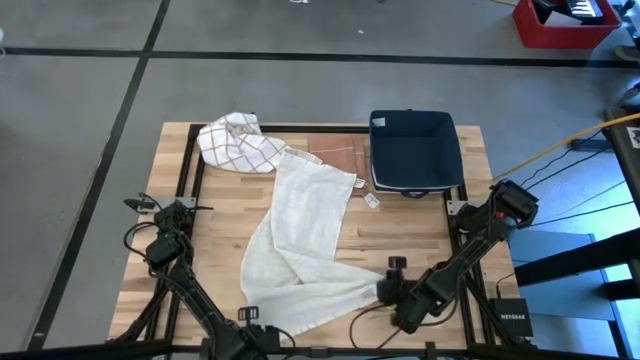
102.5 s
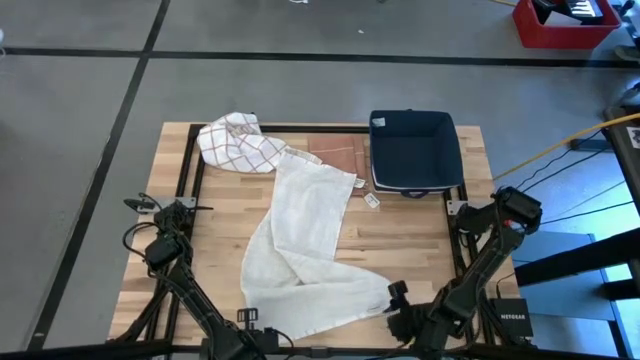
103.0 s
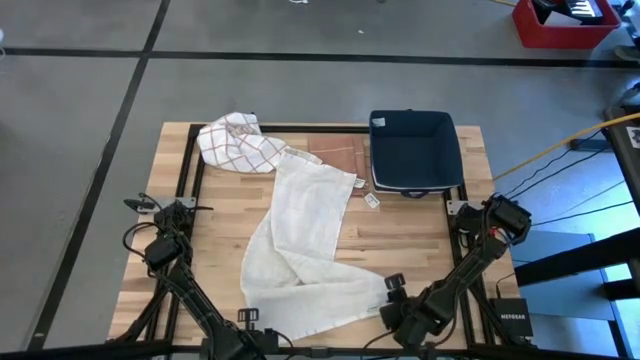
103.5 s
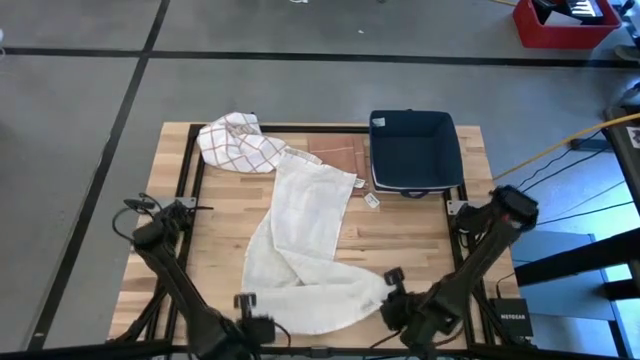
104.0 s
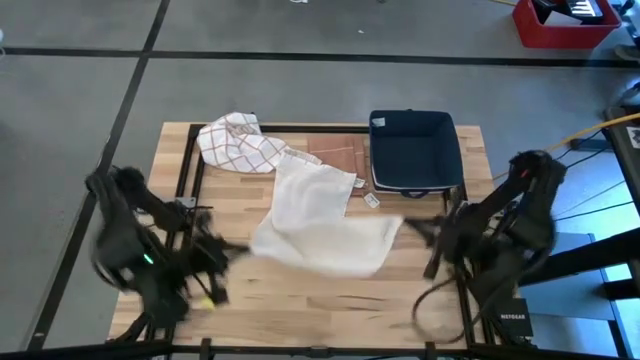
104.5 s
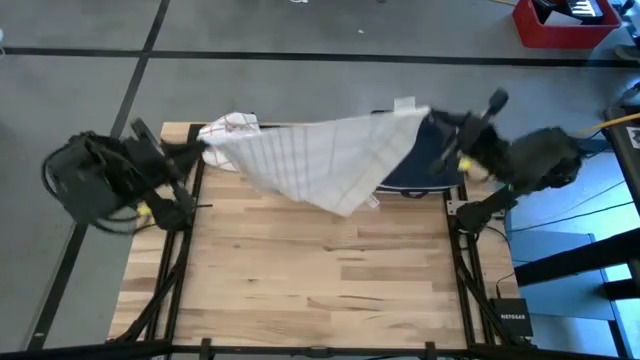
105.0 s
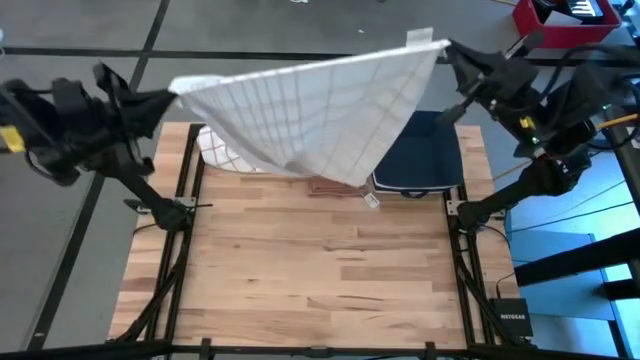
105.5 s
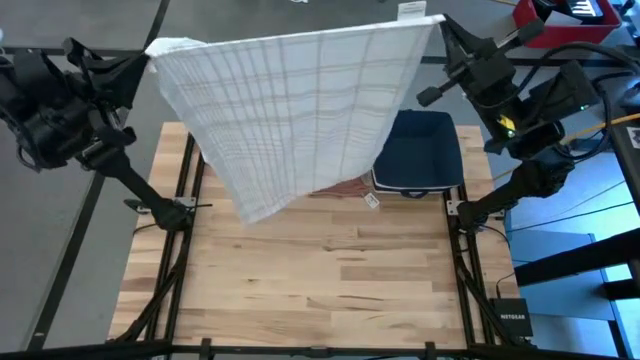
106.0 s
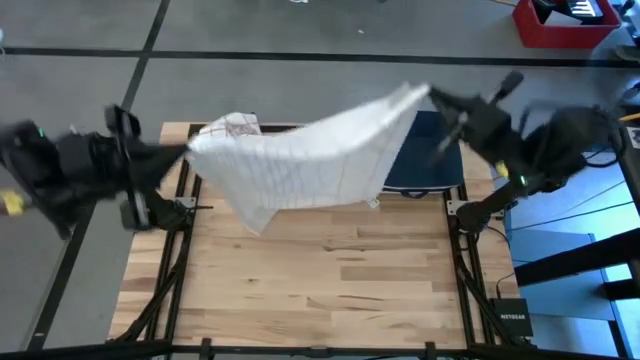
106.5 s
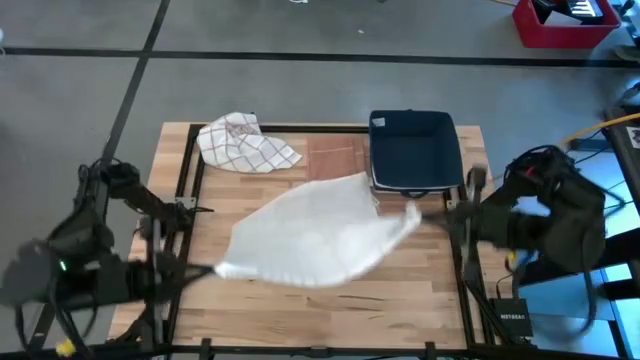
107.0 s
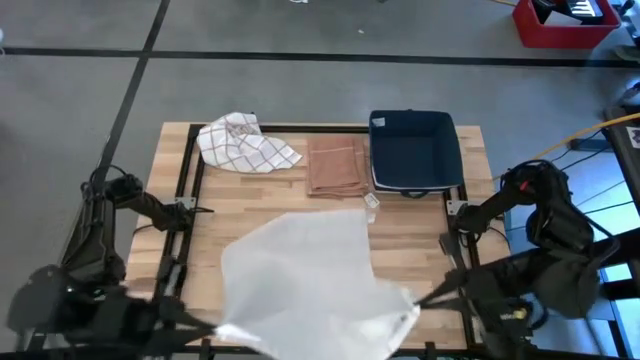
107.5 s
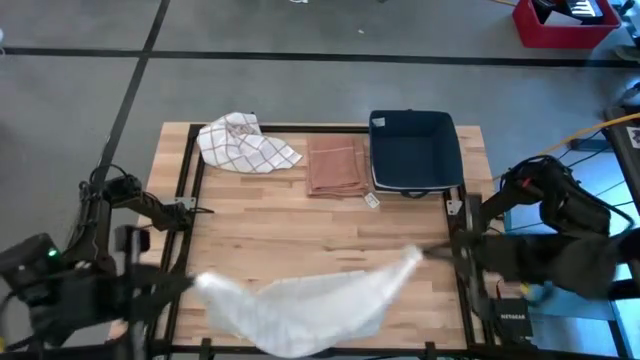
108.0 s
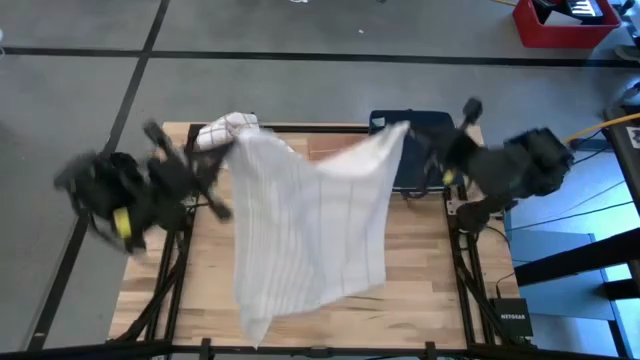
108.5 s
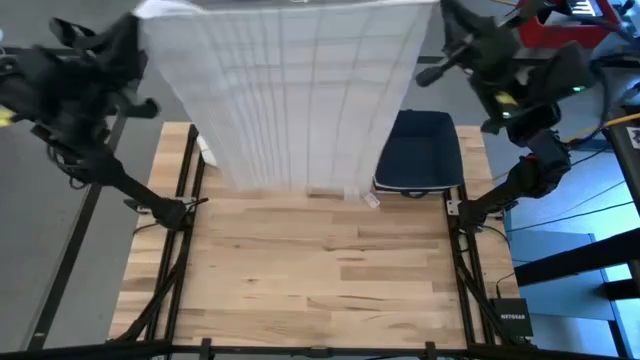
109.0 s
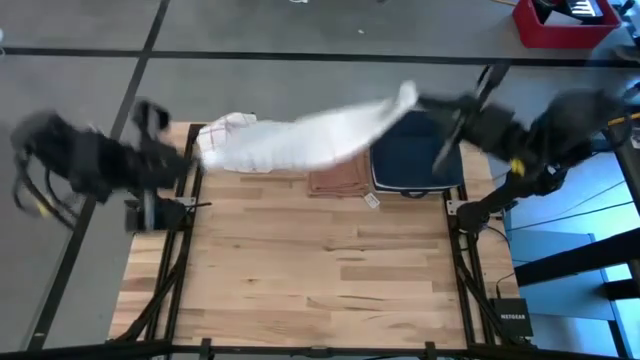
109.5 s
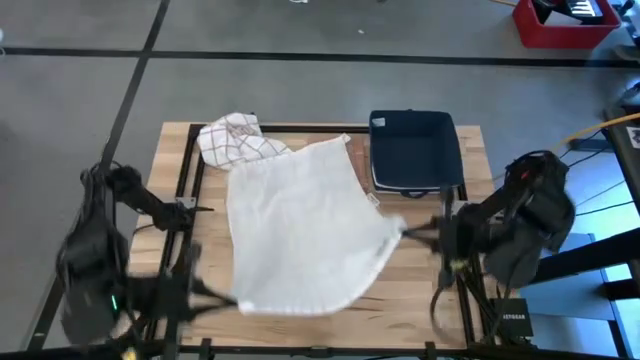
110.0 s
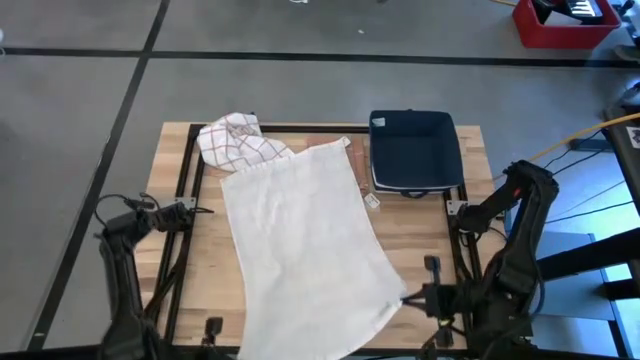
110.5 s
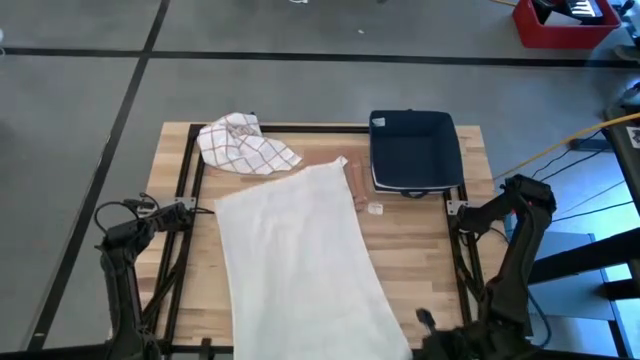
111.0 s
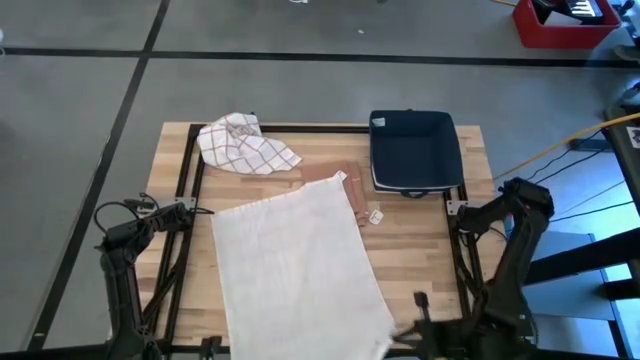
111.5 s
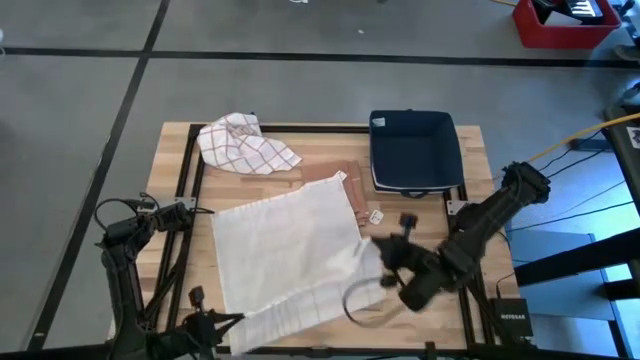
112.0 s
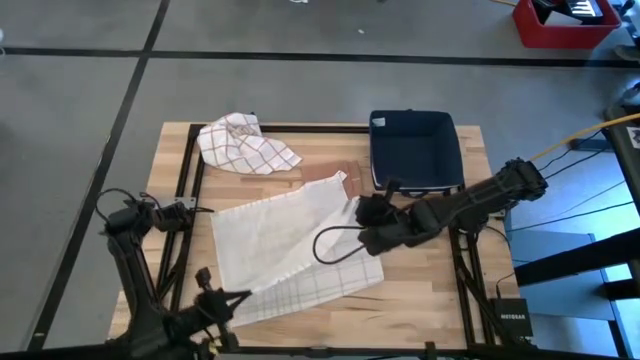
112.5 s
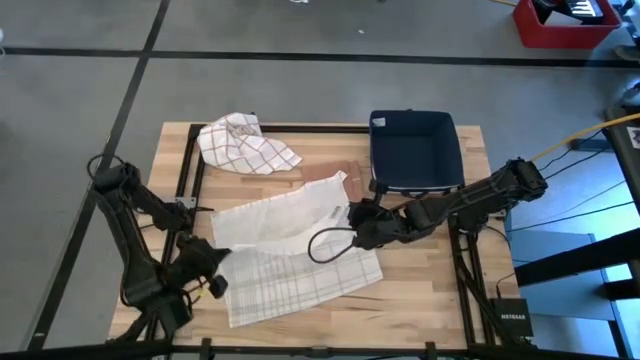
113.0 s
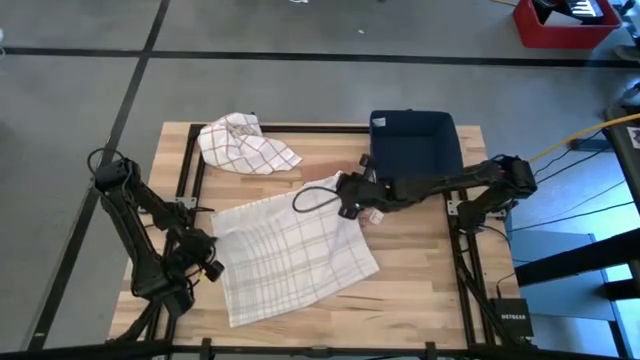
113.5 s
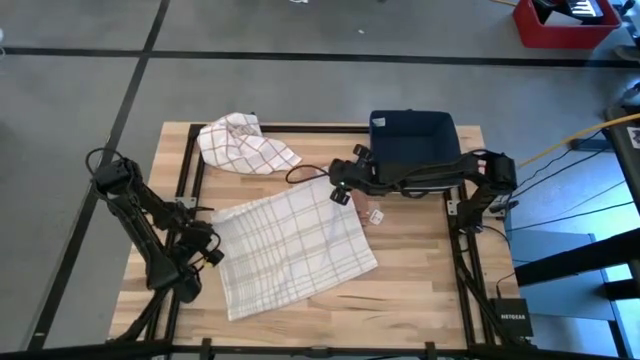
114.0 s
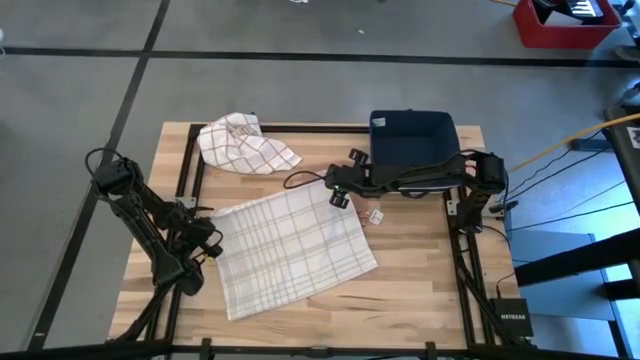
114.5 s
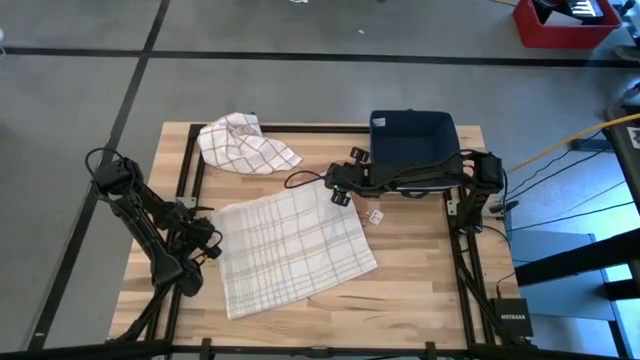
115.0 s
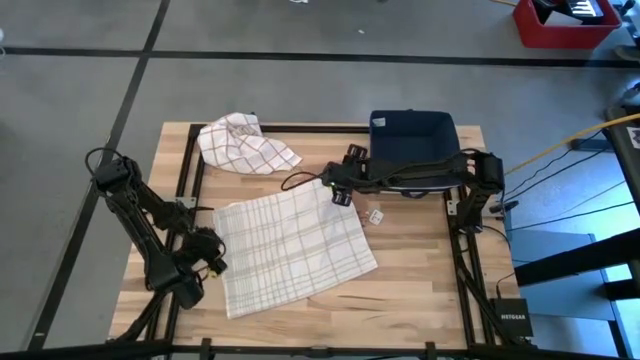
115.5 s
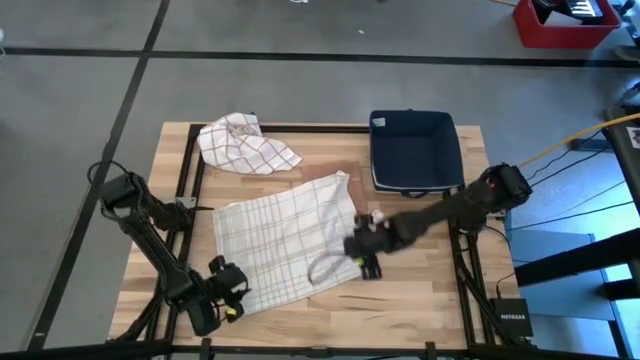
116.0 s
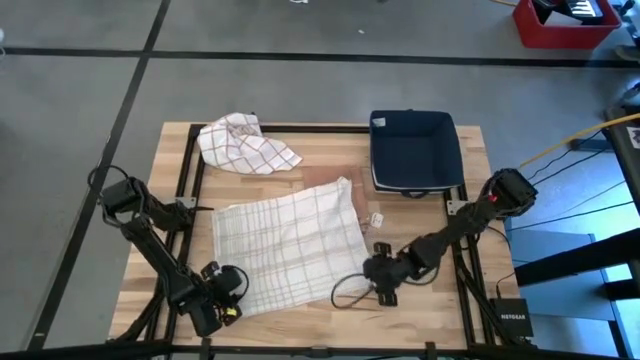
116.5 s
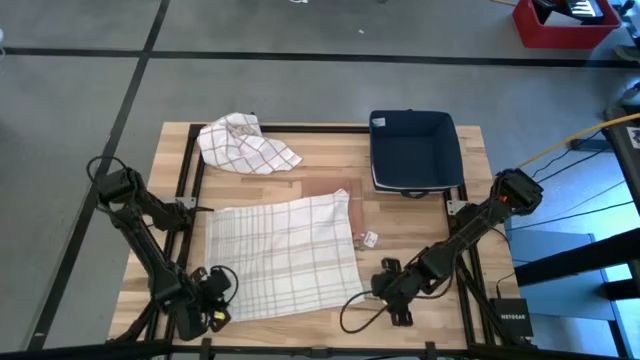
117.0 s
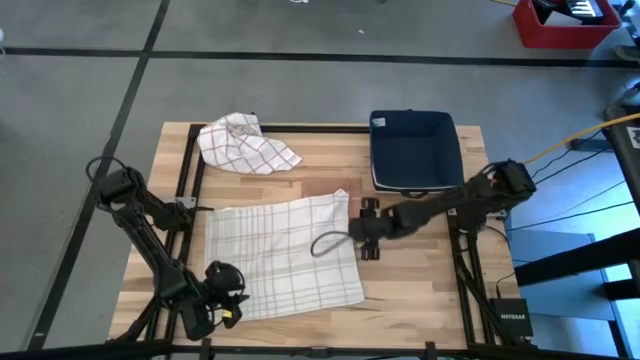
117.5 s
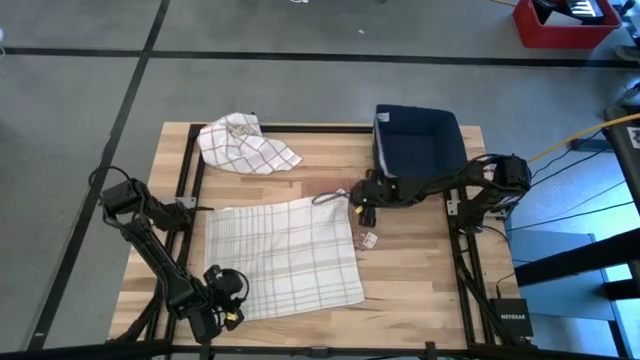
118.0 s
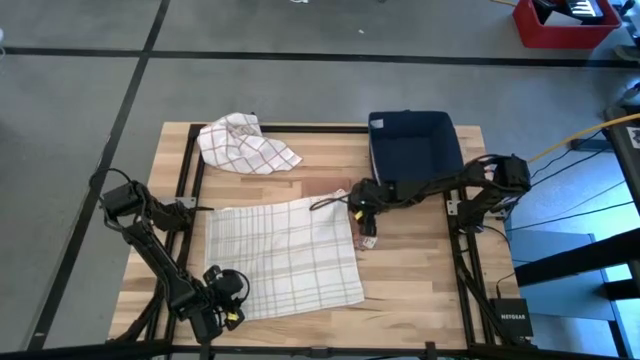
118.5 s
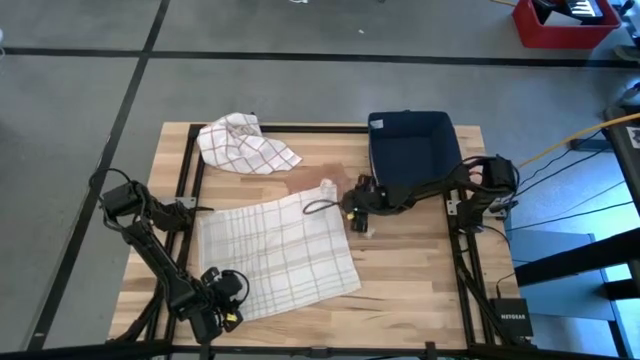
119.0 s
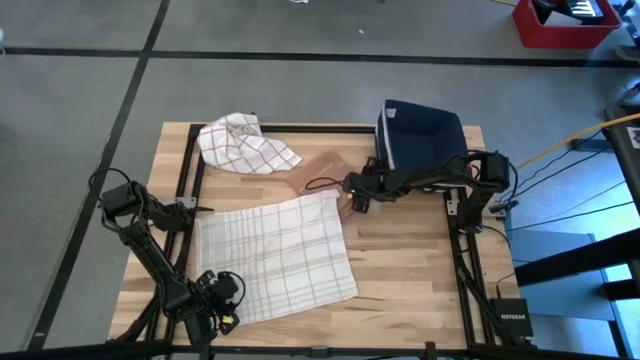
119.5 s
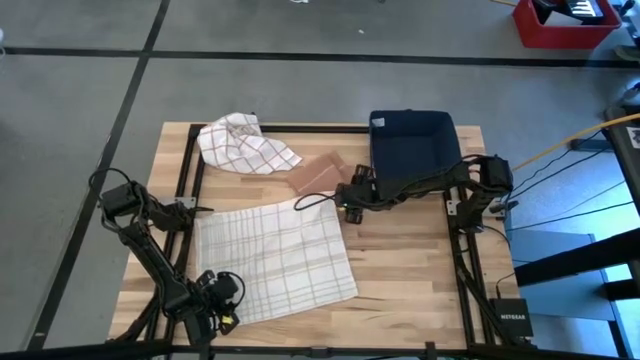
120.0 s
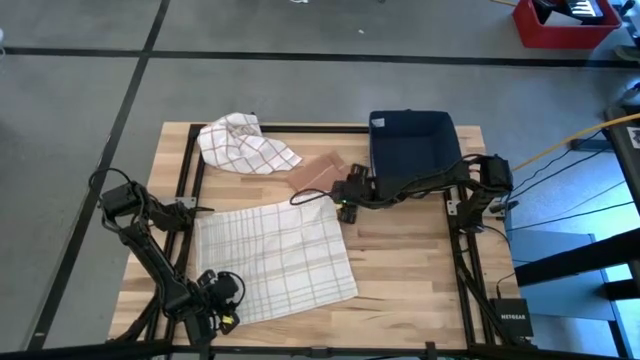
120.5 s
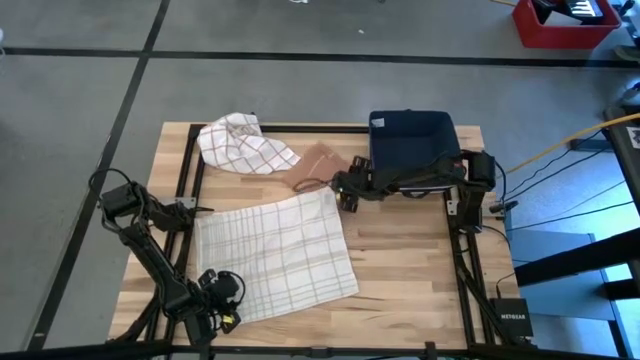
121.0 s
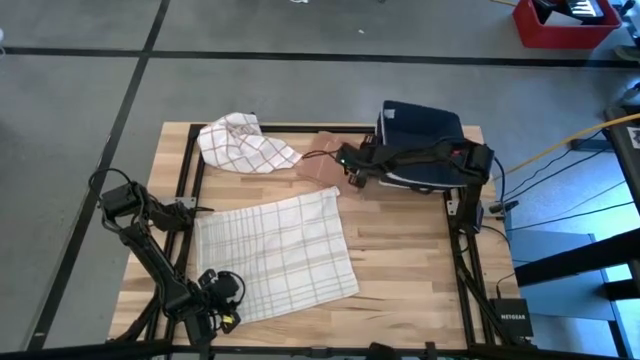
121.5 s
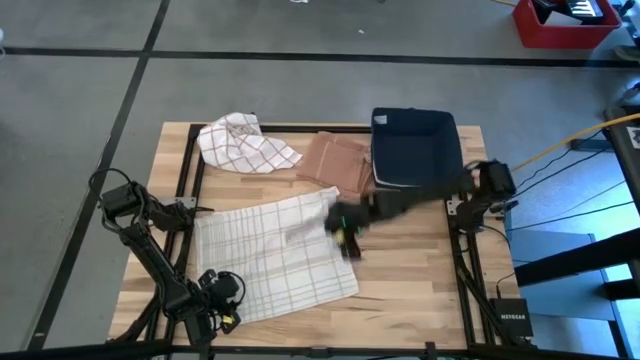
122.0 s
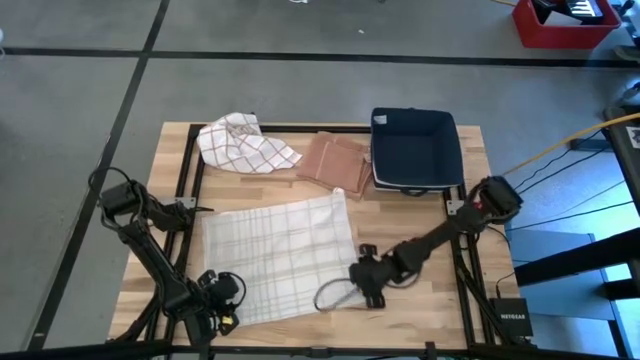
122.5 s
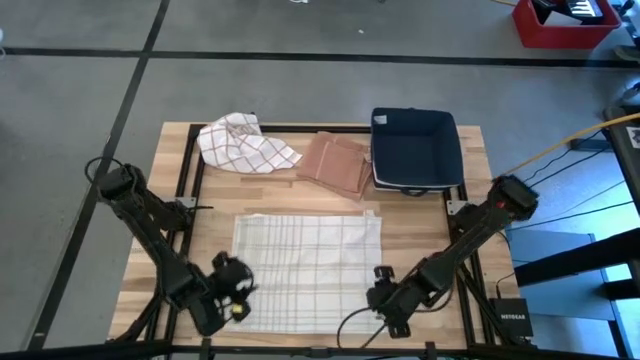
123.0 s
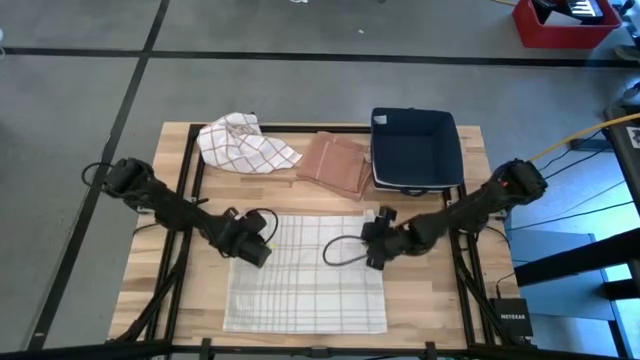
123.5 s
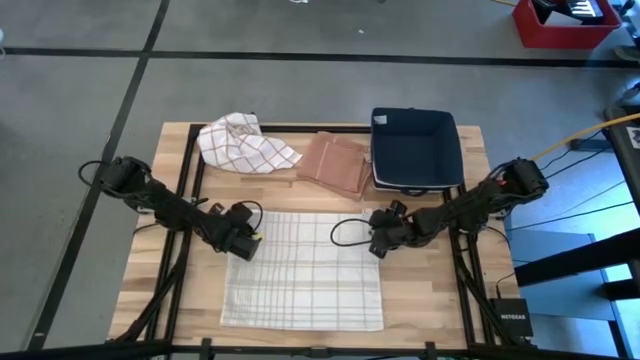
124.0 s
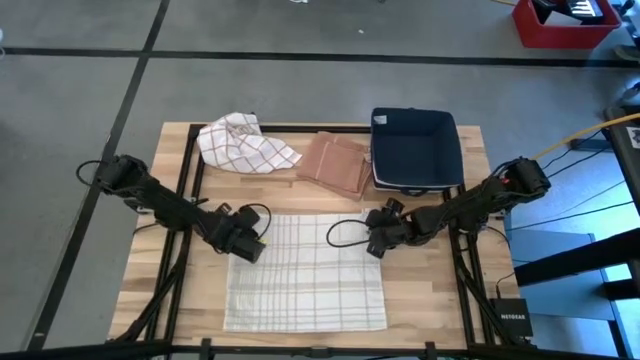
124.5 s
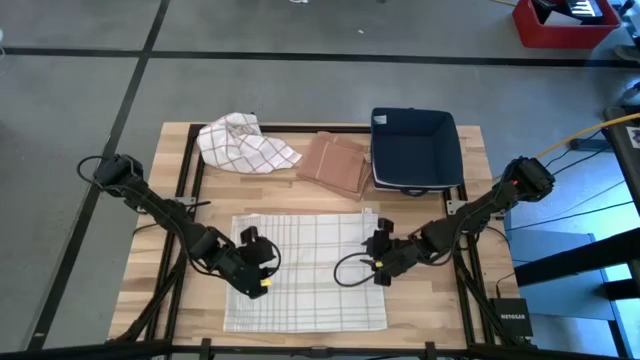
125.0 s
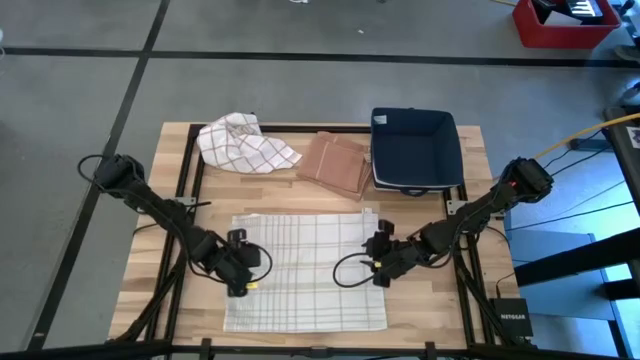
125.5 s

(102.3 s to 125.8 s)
Task: Fold towel
Fold the bottom white towel
